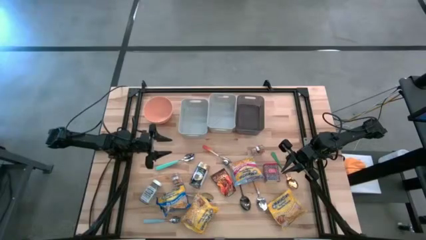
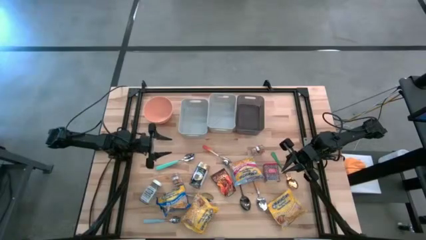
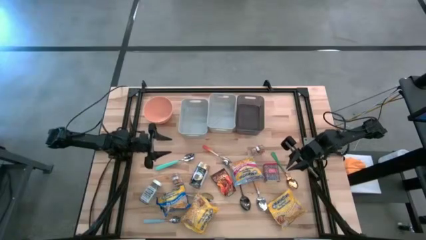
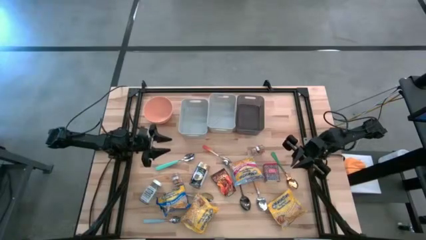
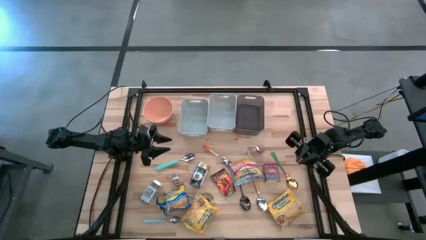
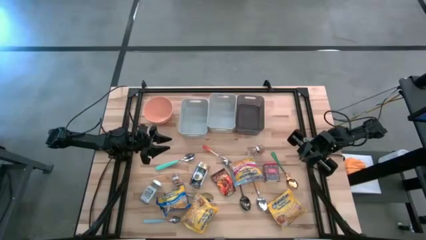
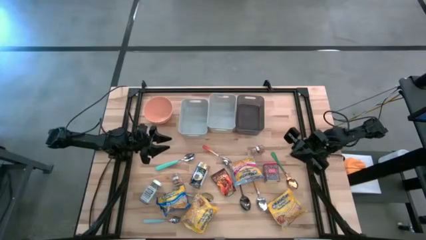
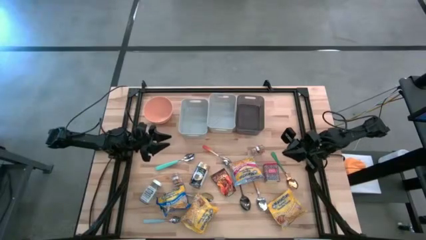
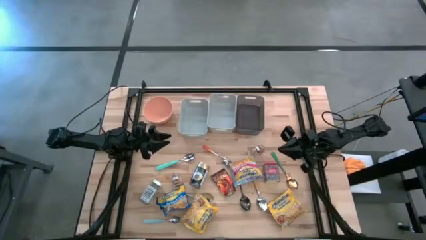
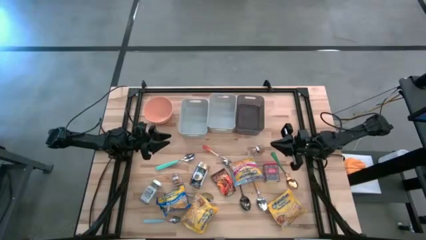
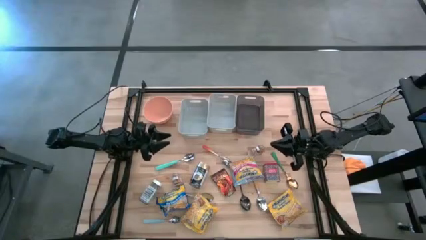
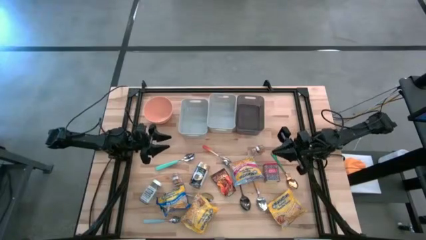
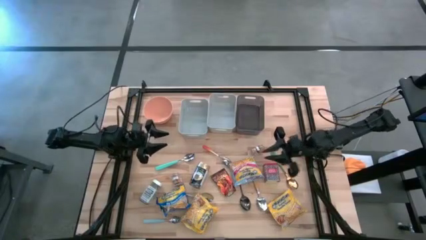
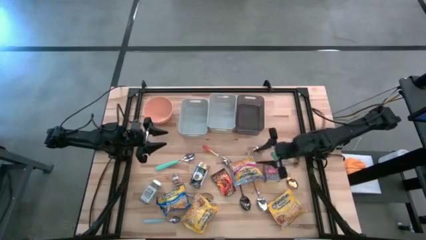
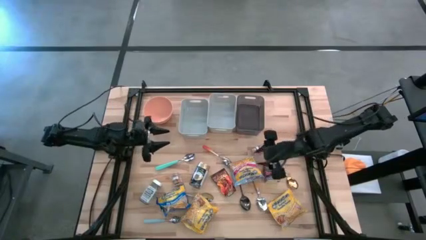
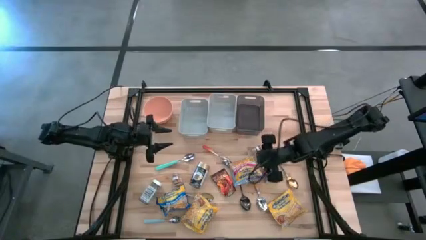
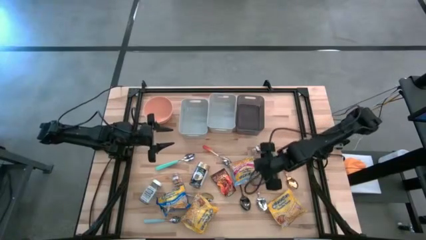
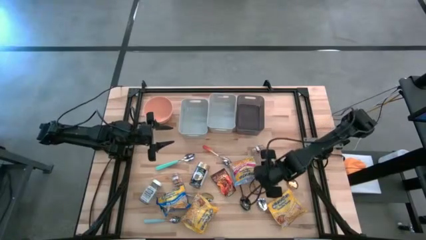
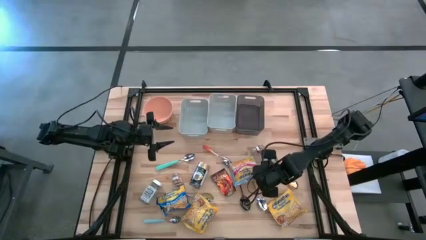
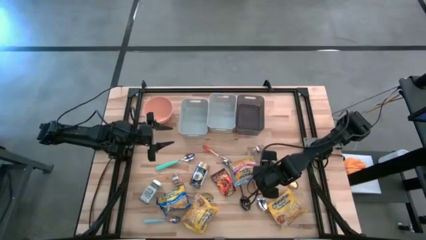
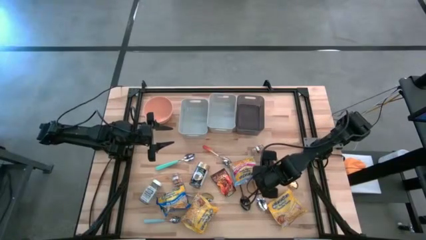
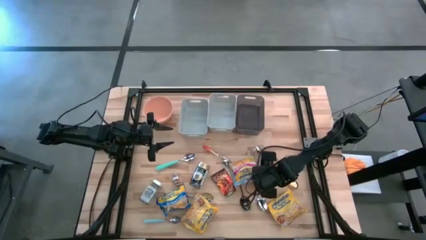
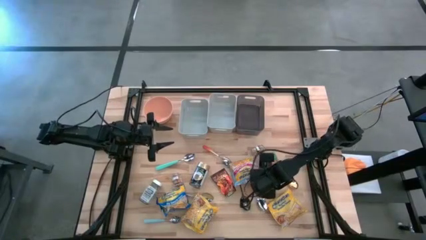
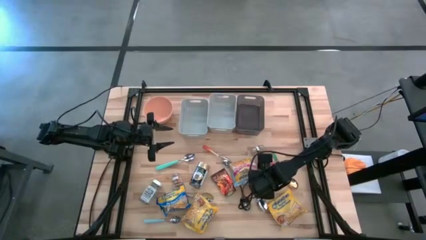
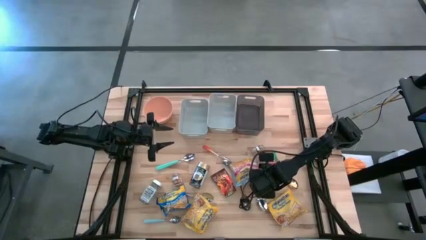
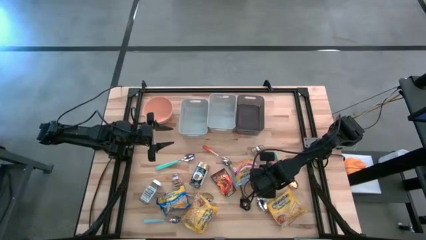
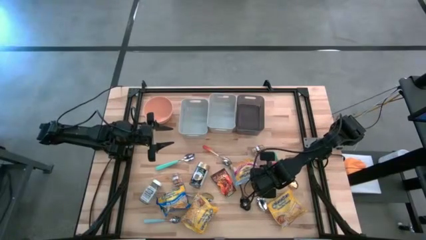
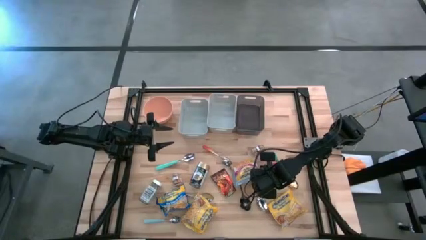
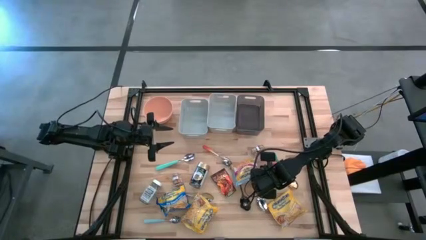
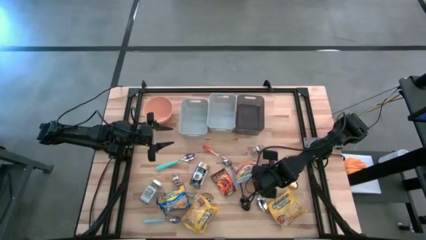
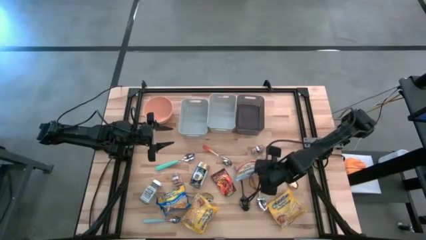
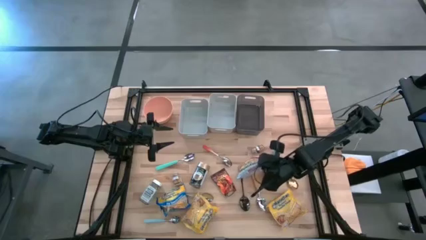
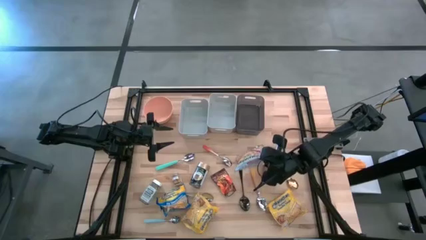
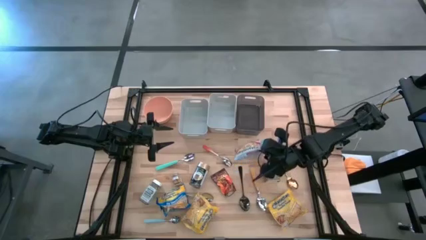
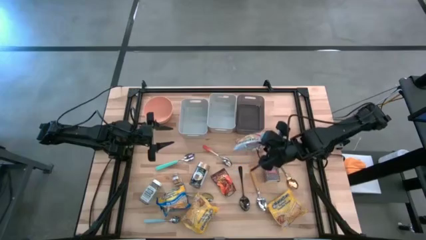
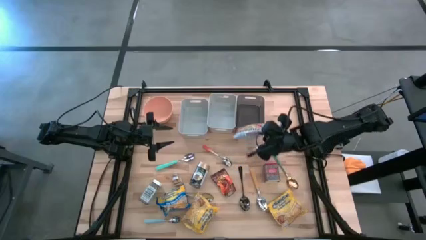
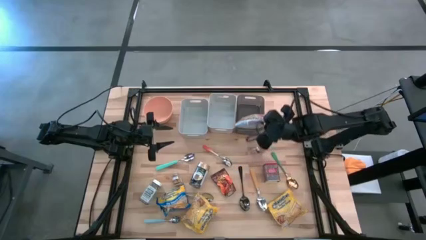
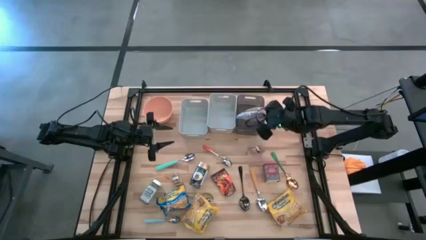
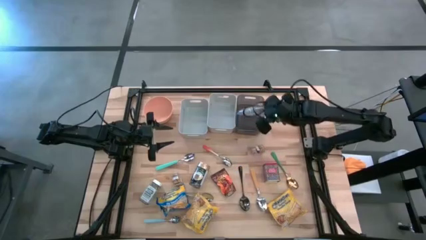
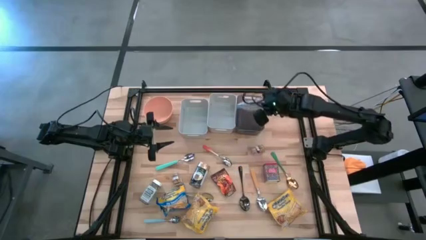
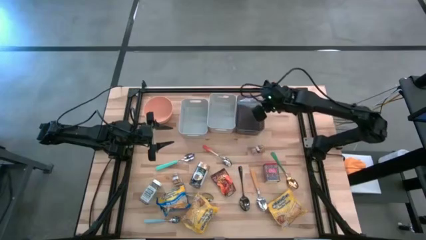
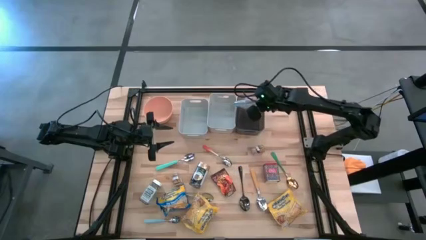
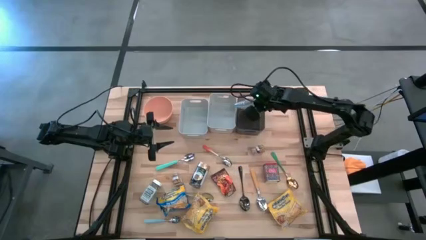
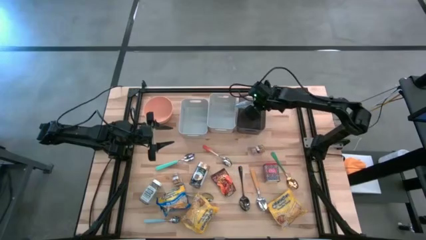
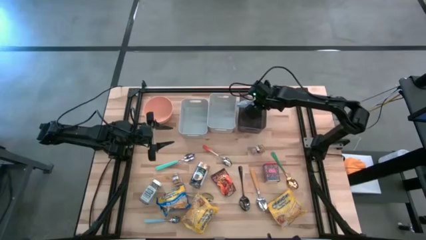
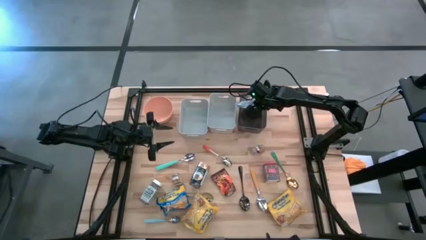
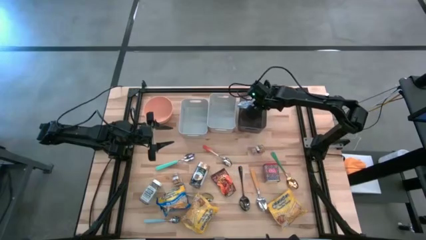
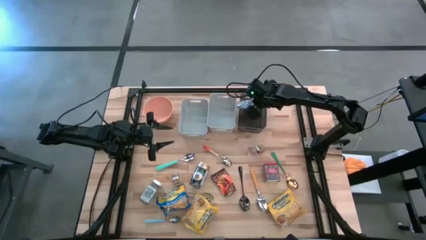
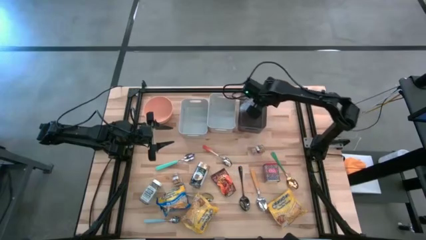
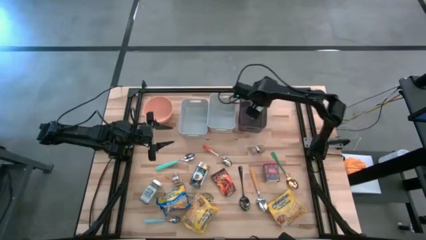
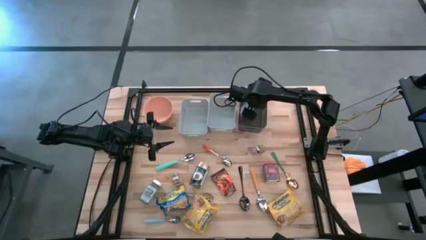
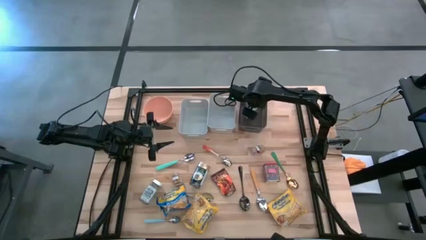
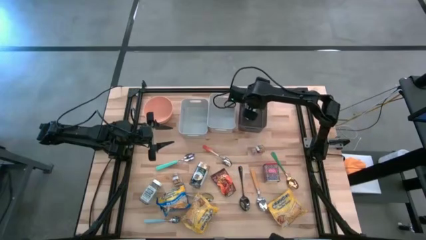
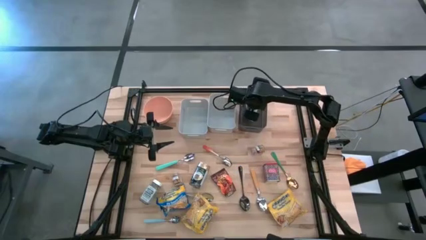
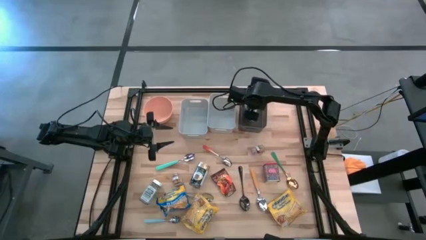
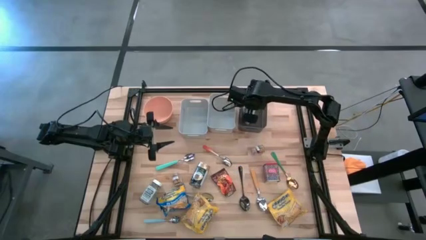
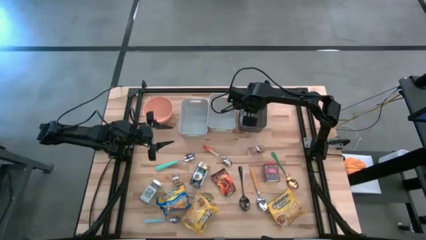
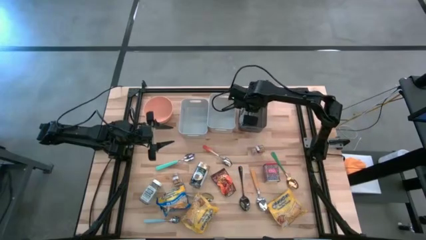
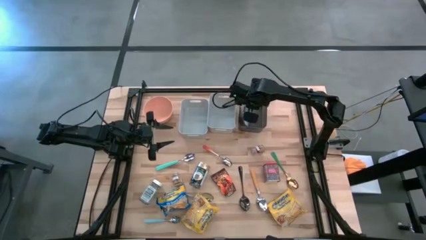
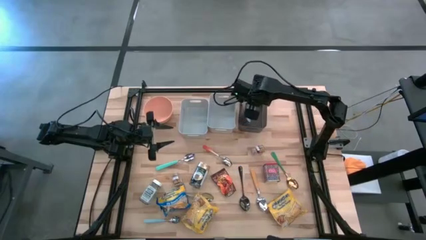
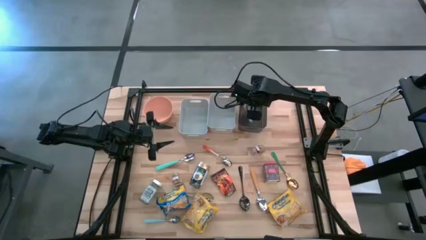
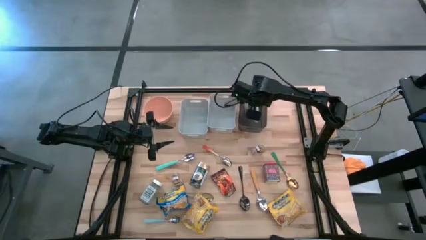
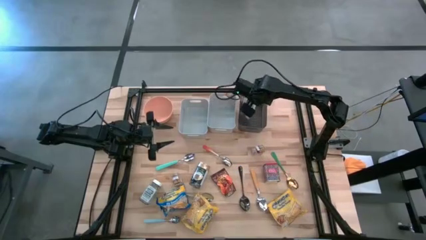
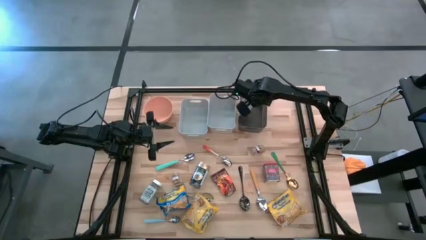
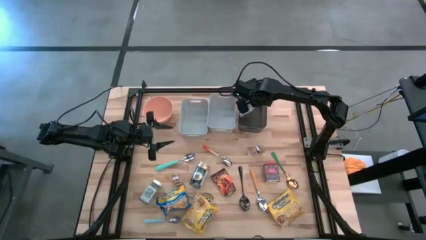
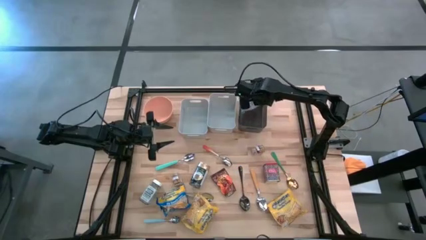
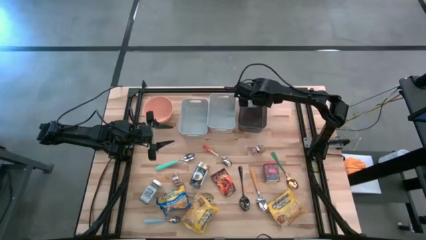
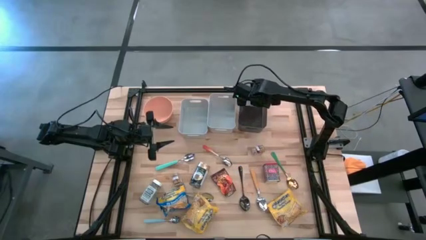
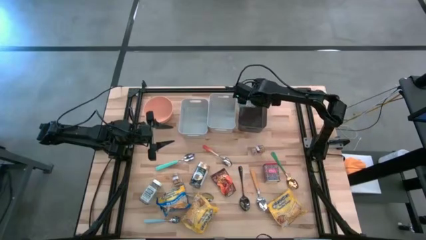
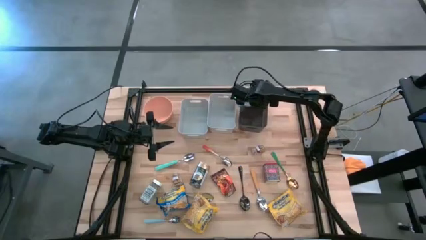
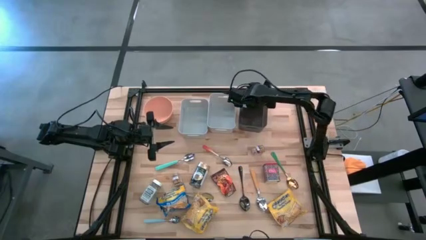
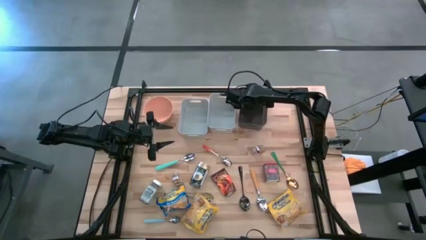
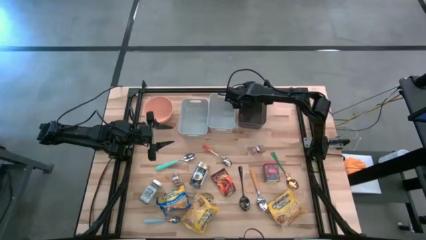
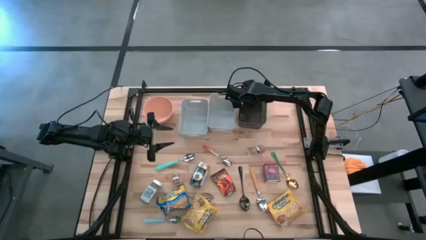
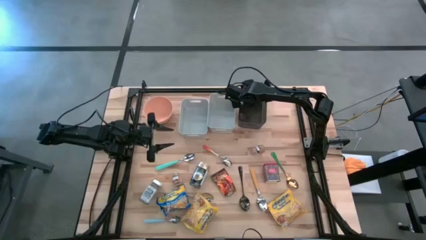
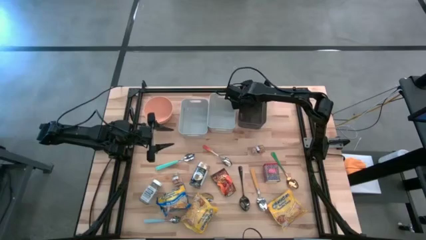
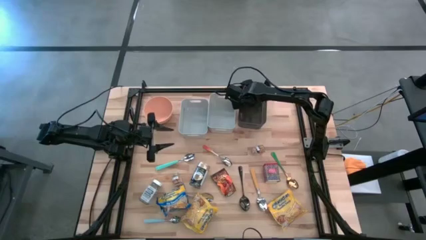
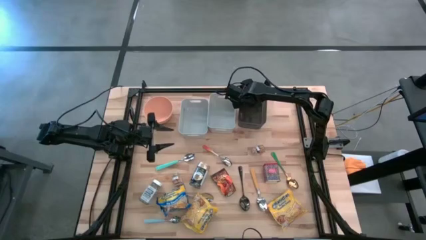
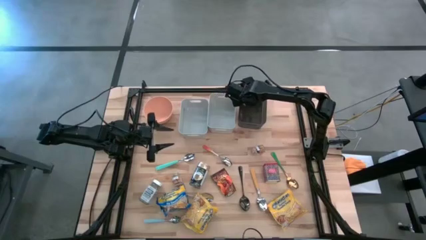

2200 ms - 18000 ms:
Put the light blue noodle pack into the black bin
